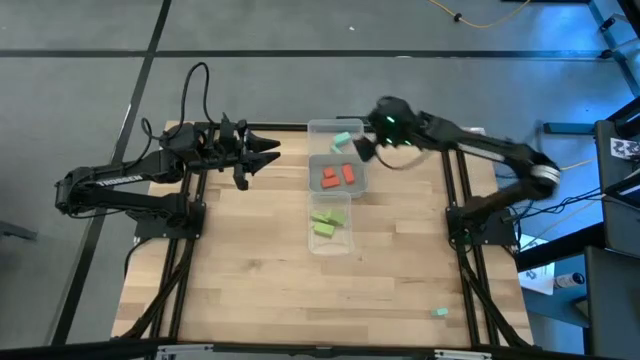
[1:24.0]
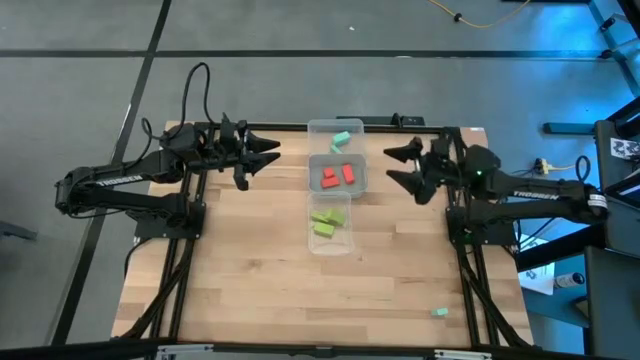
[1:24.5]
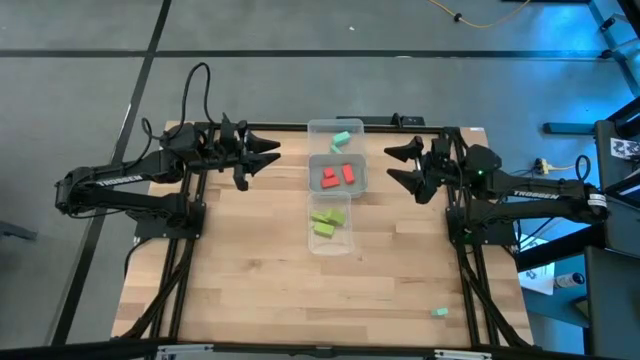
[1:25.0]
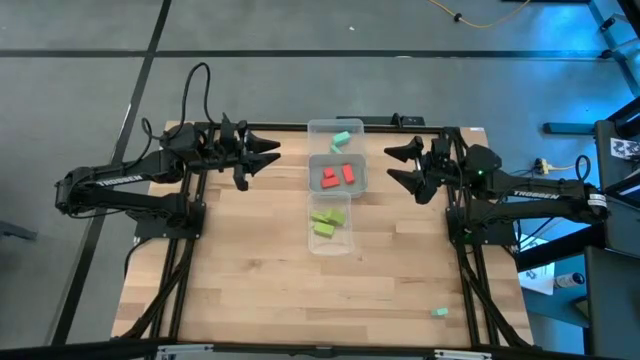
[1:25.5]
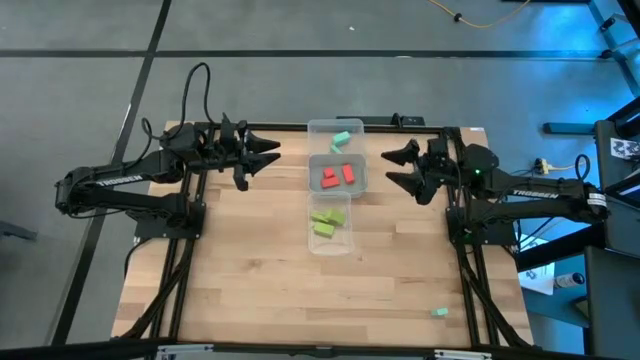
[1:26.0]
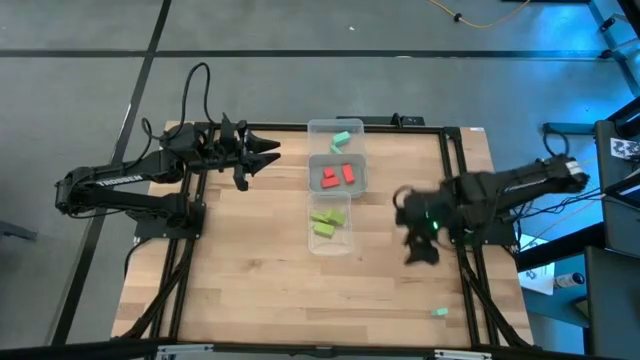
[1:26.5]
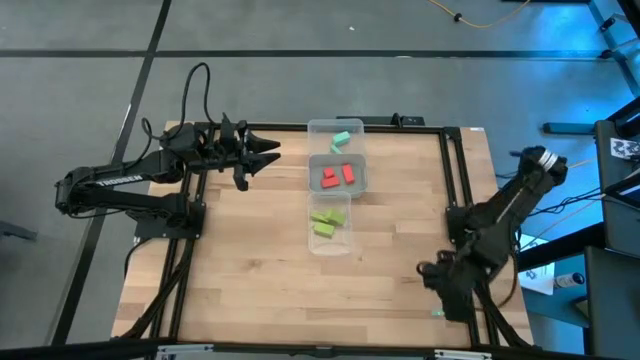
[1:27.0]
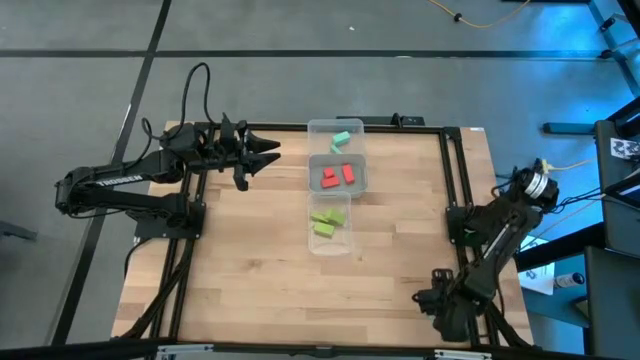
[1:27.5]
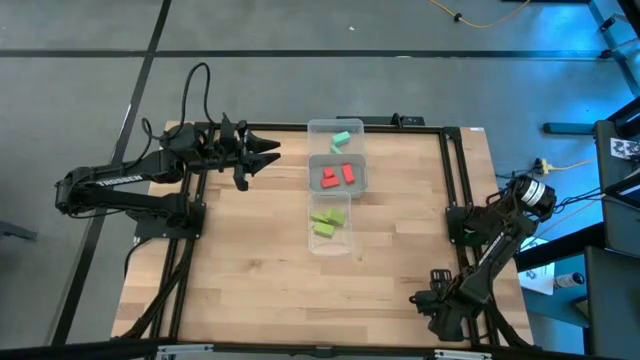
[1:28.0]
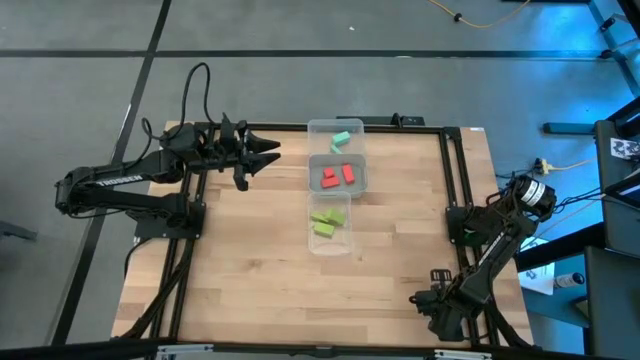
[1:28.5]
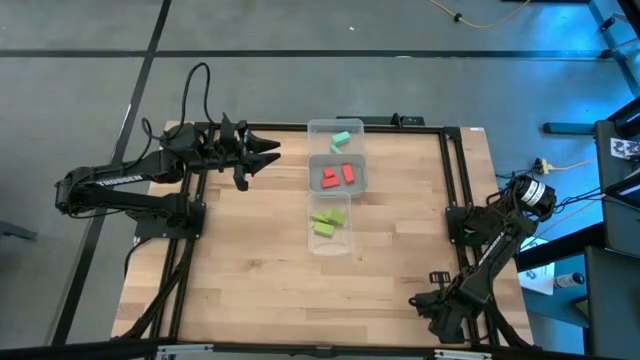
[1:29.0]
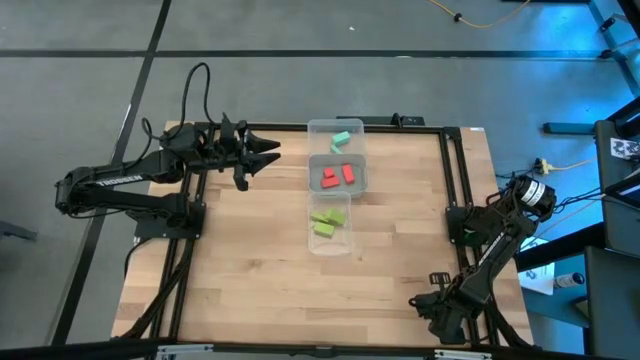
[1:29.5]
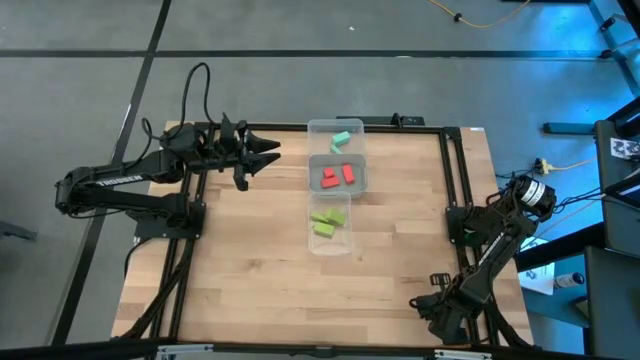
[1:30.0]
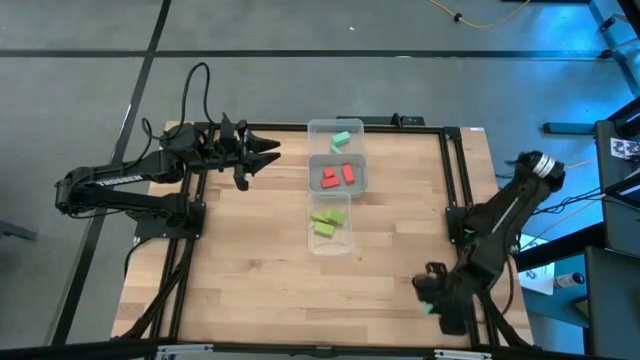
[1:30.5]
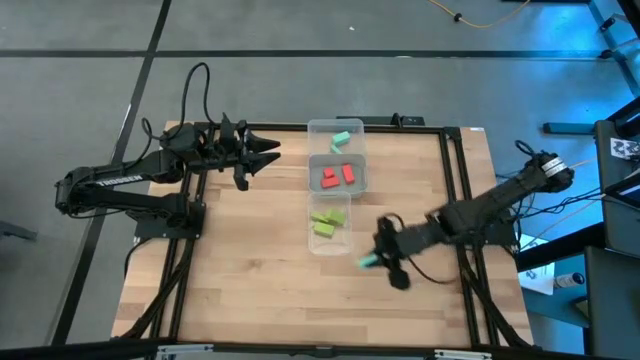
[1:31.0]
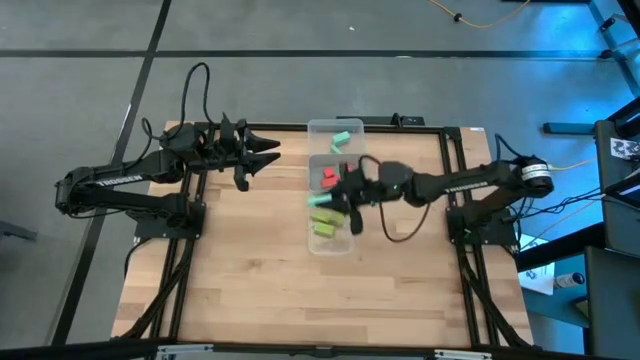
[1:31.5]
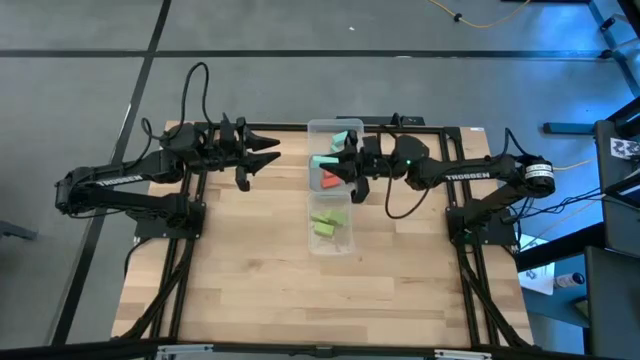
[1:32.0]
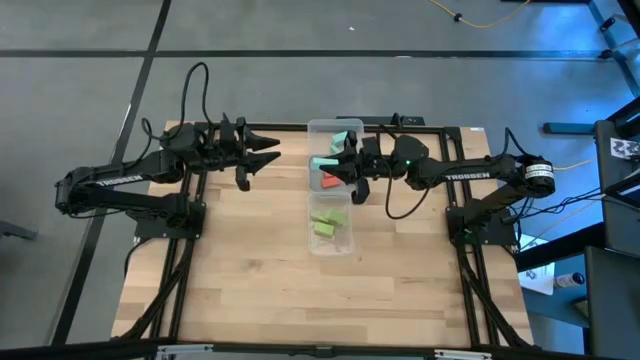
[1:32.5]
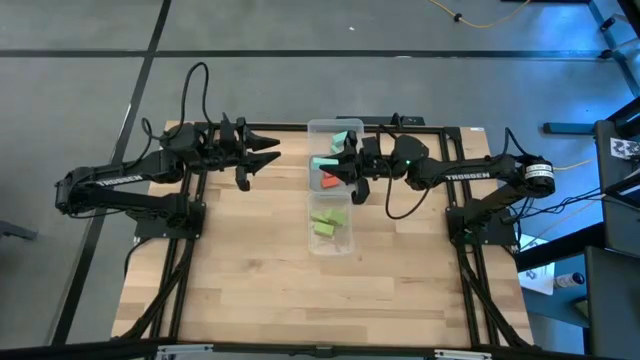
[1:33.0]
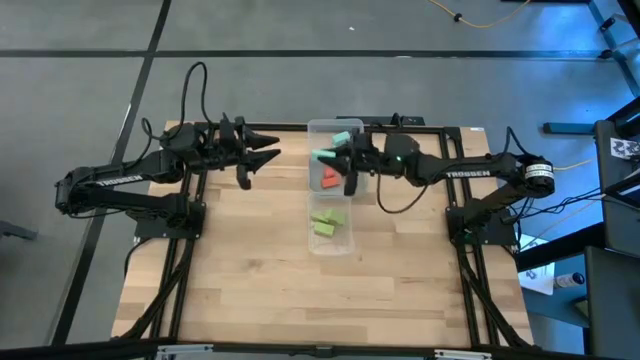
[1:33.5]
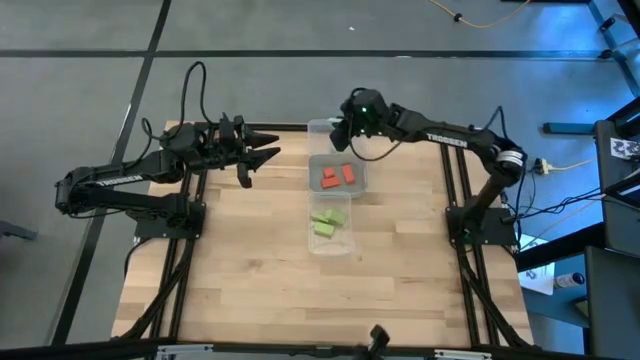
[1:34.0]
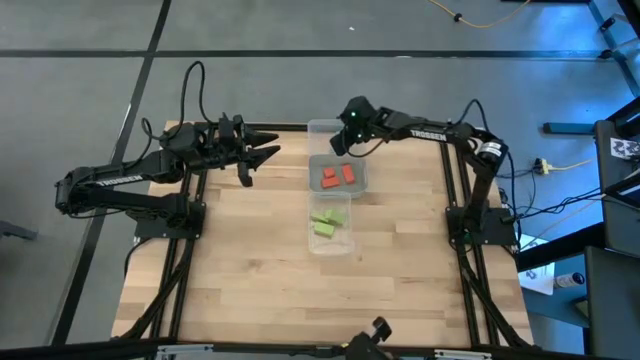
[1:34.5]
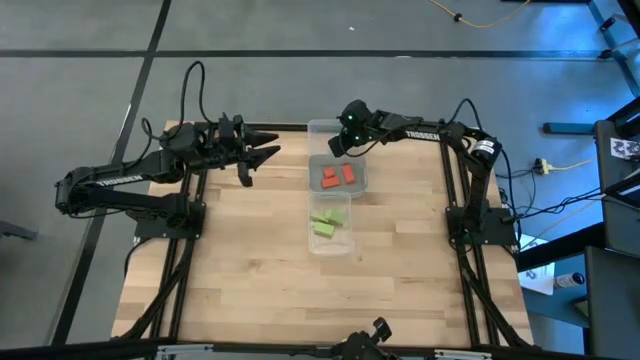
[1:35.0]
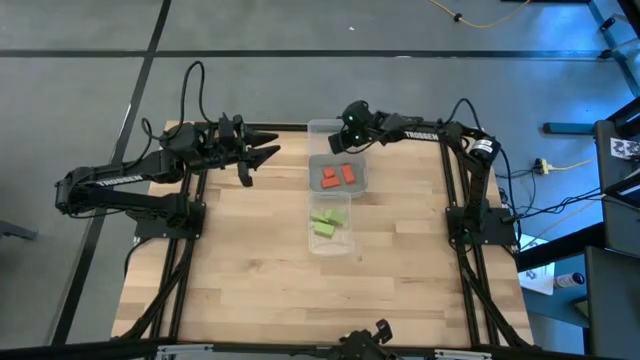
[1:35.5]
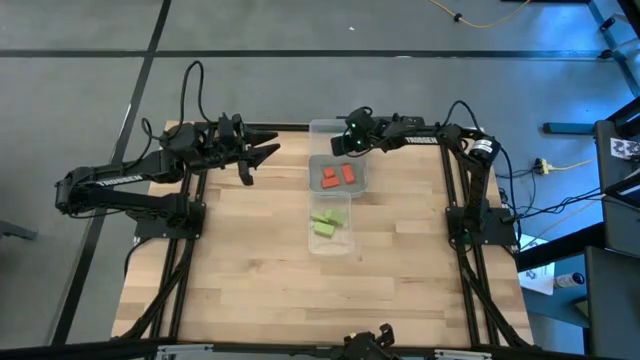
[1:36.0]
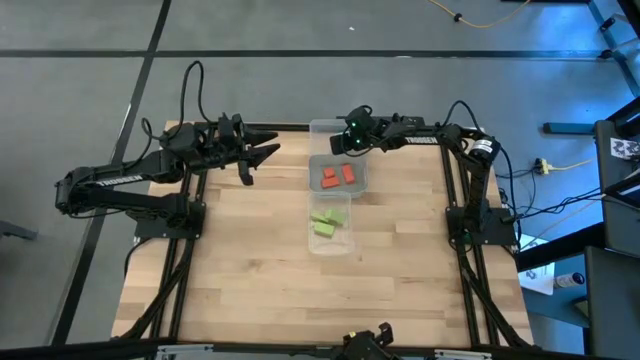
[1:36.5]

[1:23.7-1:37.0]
Task: Sort & place blocks by color
Put the blue block into the top transparent bin

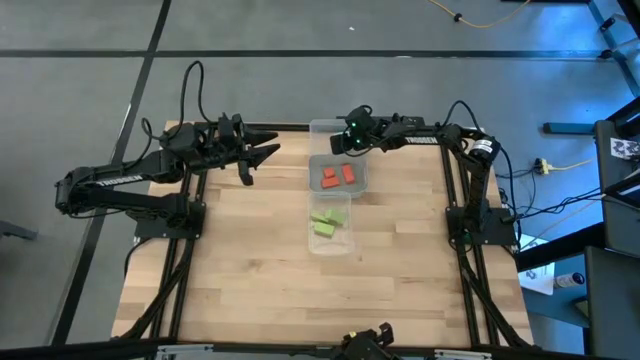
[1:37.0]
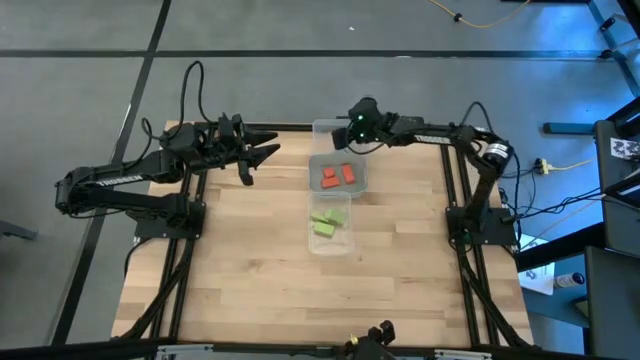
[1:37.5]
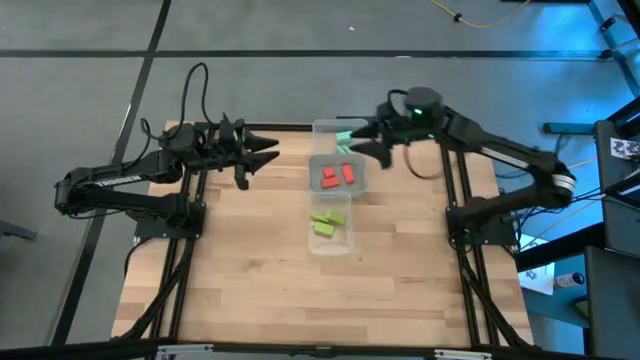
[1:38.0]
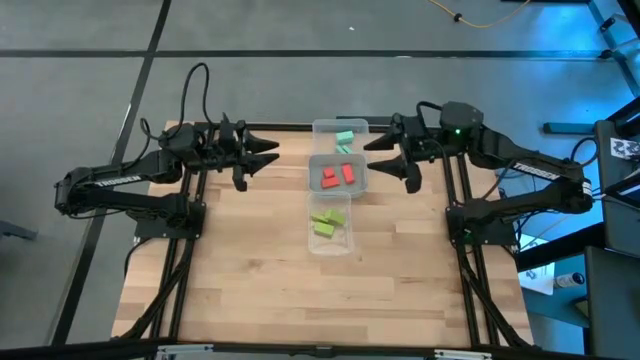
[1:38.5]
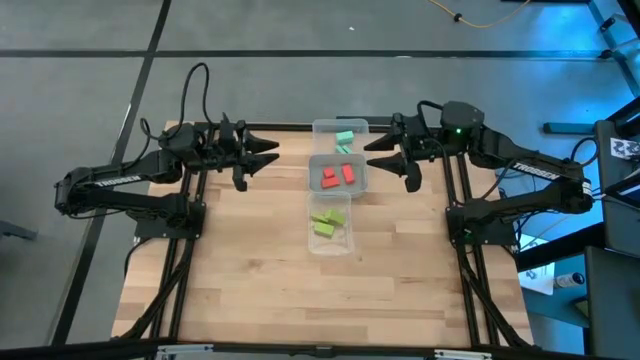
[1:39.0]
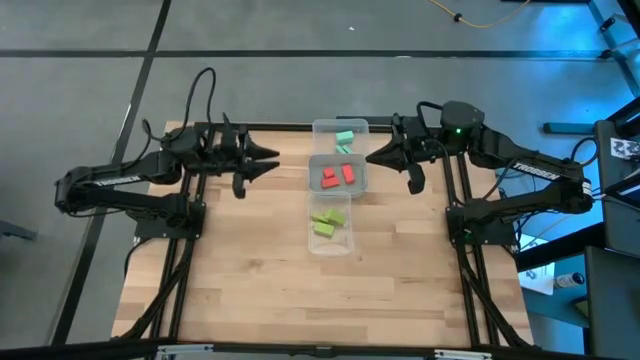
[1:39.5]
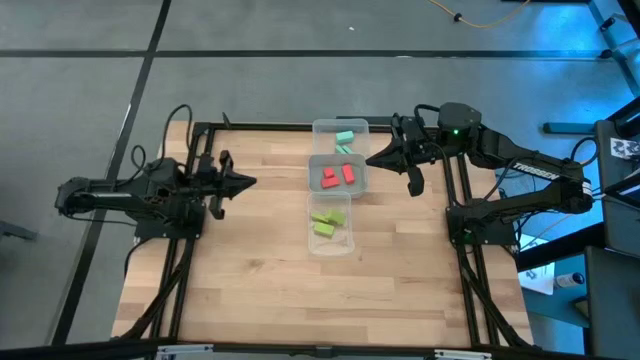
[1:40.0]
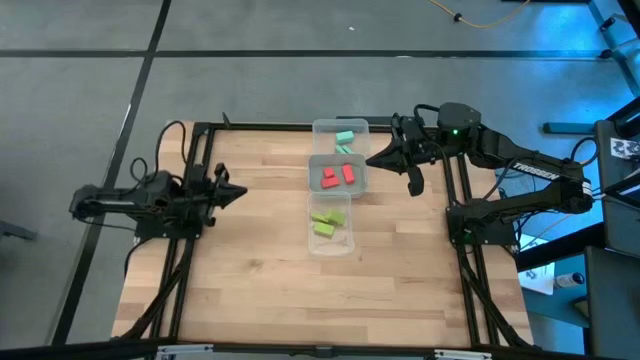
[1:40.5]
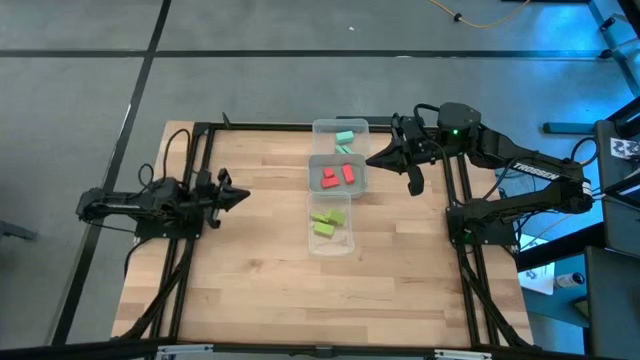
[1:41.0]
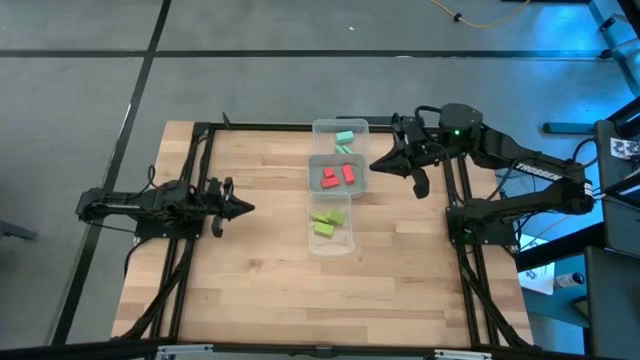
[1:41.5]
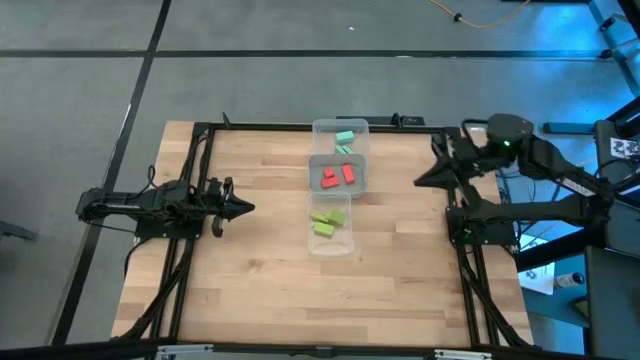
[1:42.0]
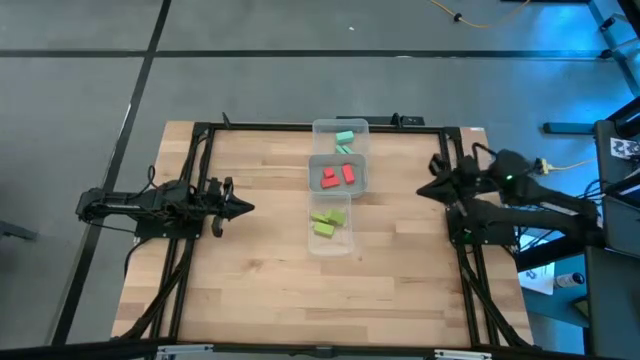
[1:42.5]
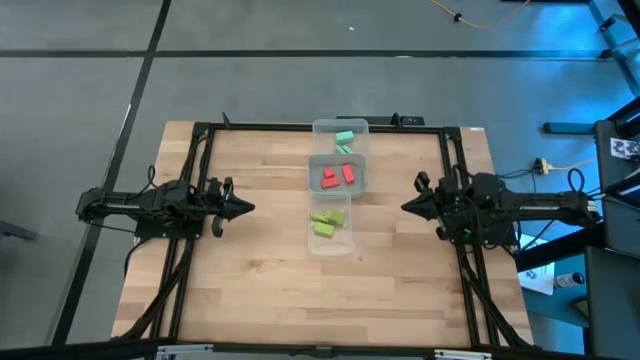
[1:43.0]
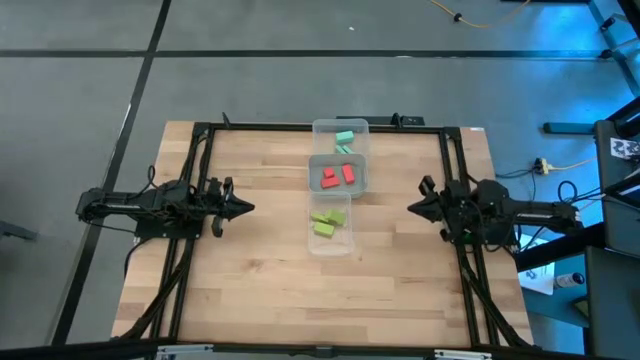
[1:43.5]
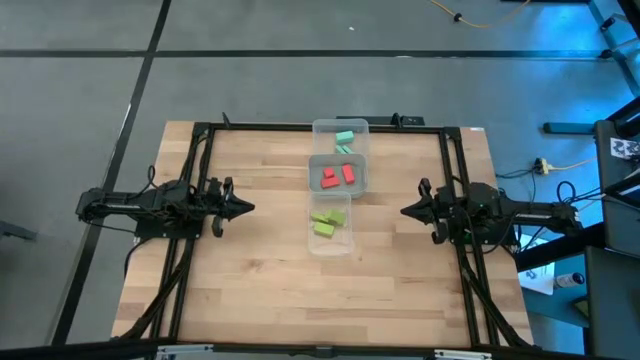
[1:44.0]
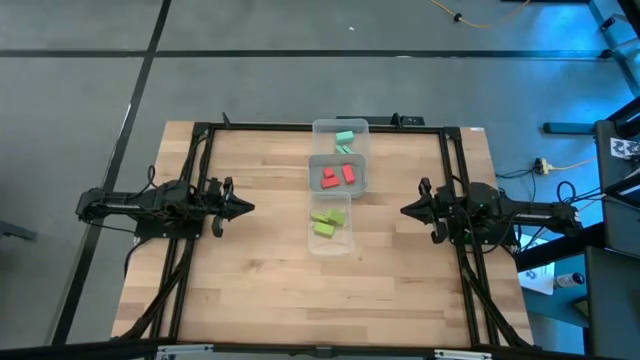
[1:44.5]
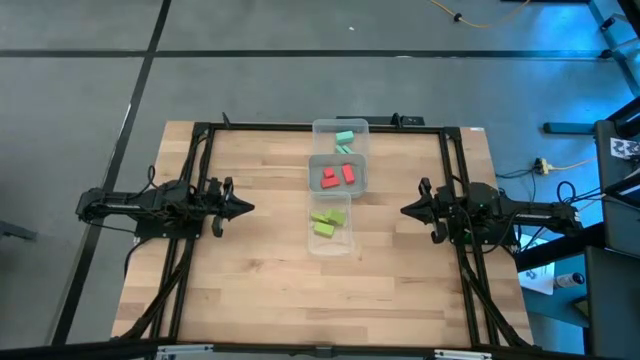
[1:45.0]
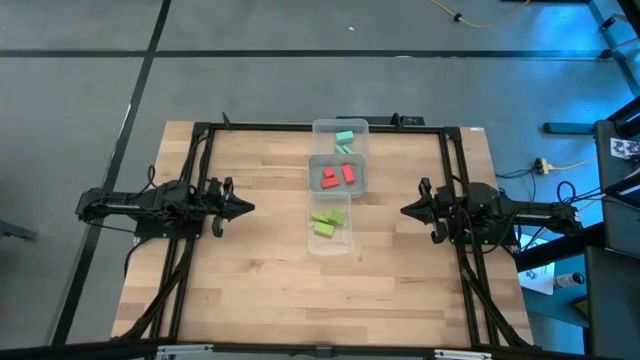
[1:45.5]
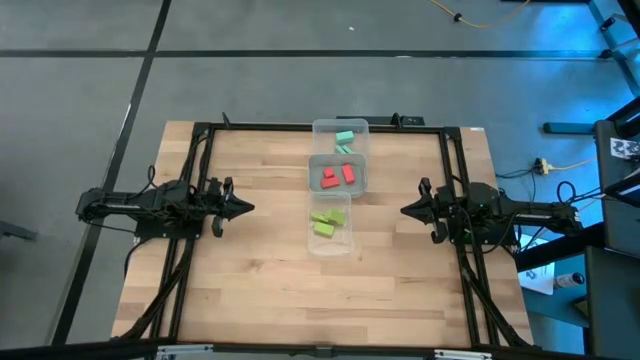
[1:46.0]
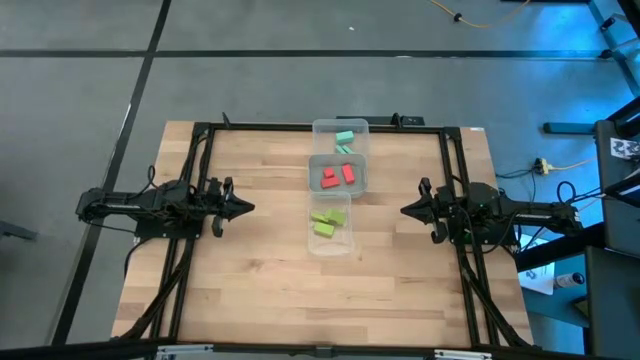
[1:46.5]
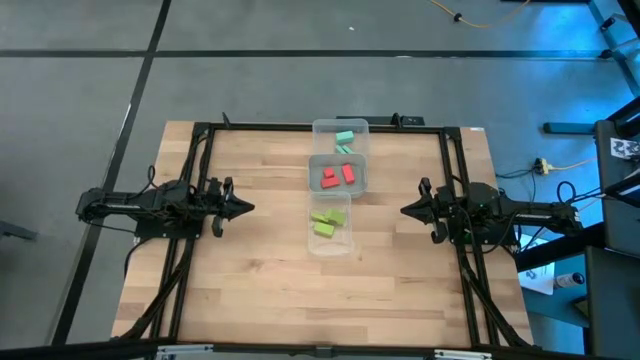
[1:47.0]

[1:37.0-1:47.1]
Return to Home Position
